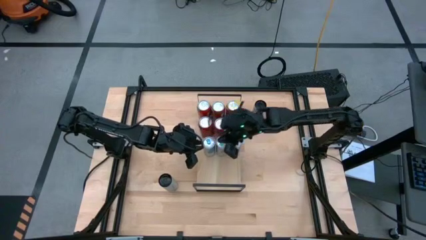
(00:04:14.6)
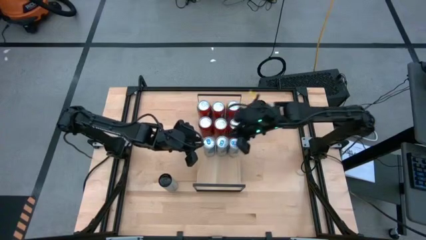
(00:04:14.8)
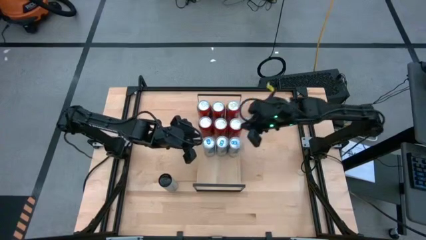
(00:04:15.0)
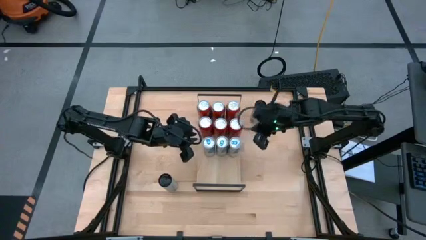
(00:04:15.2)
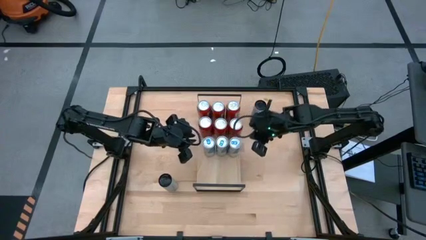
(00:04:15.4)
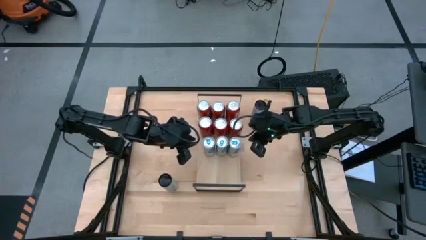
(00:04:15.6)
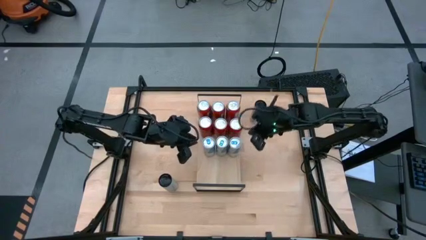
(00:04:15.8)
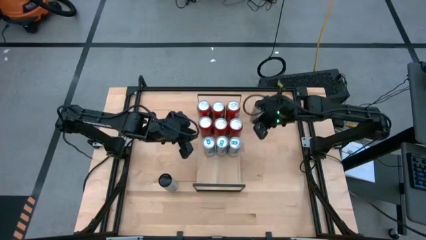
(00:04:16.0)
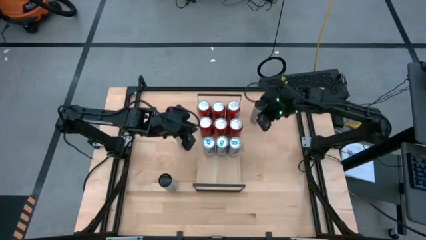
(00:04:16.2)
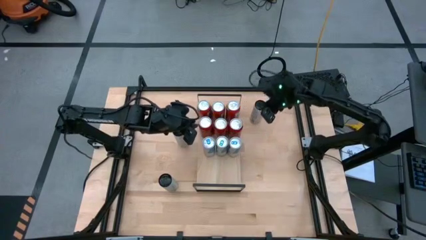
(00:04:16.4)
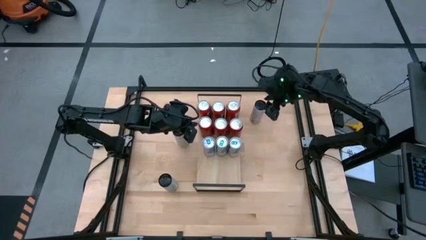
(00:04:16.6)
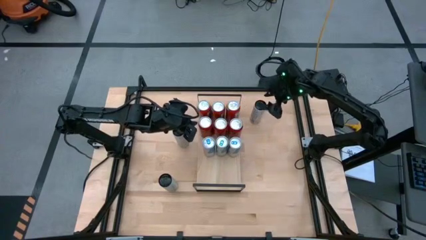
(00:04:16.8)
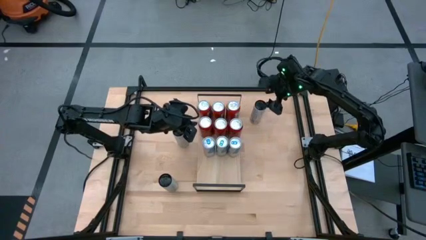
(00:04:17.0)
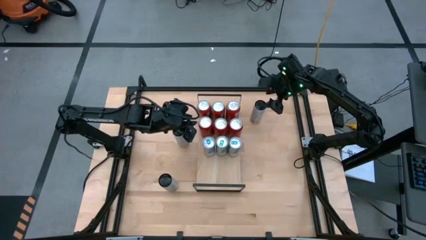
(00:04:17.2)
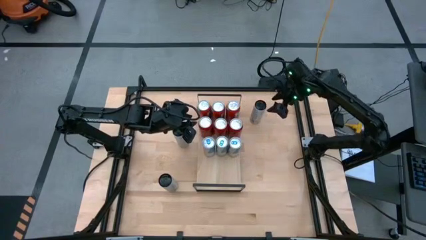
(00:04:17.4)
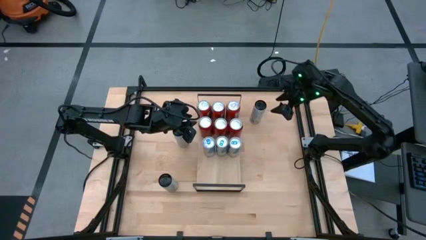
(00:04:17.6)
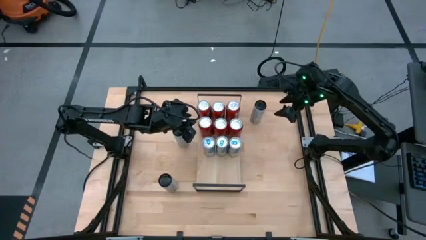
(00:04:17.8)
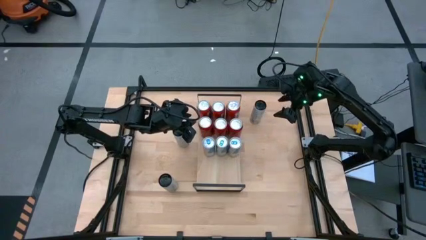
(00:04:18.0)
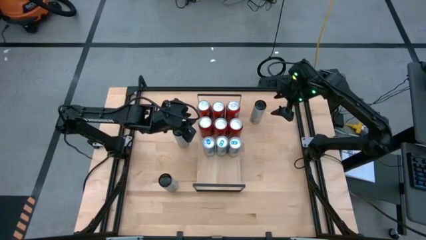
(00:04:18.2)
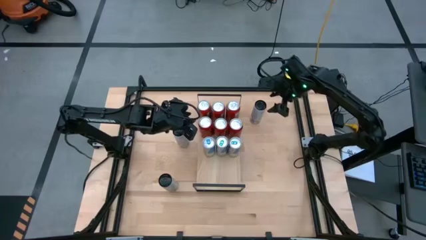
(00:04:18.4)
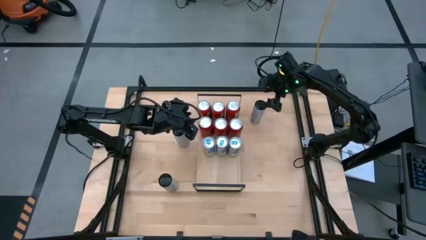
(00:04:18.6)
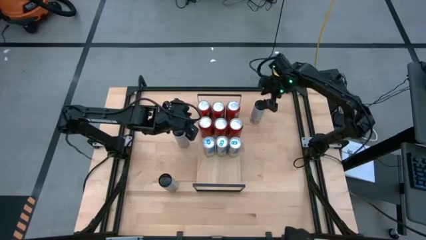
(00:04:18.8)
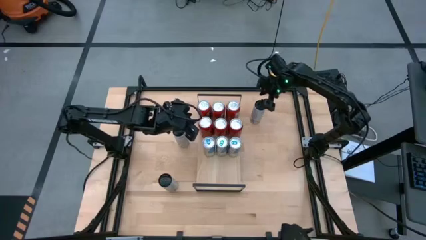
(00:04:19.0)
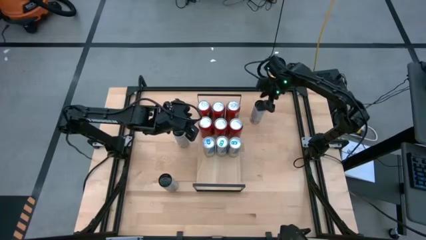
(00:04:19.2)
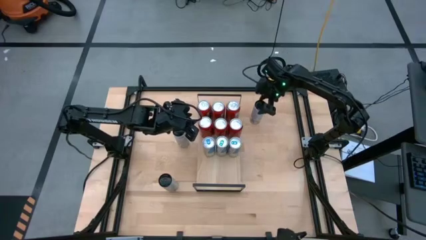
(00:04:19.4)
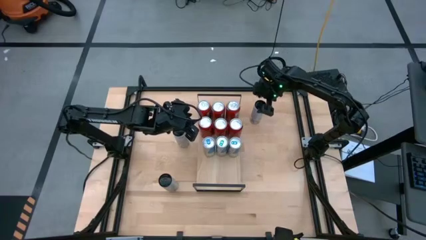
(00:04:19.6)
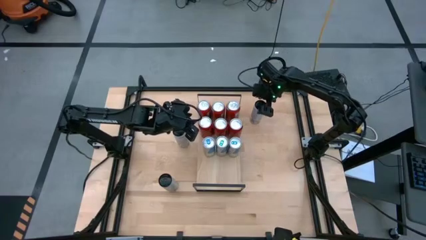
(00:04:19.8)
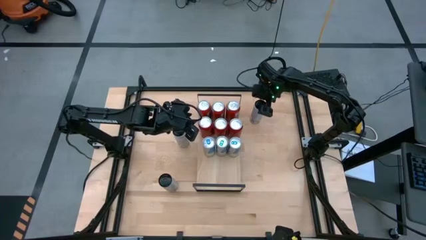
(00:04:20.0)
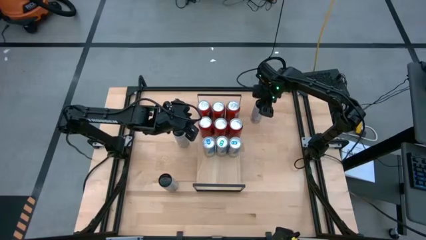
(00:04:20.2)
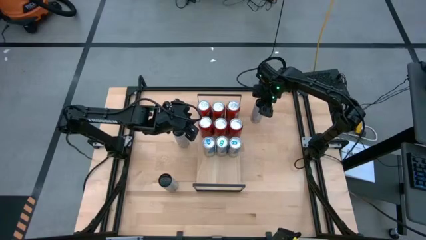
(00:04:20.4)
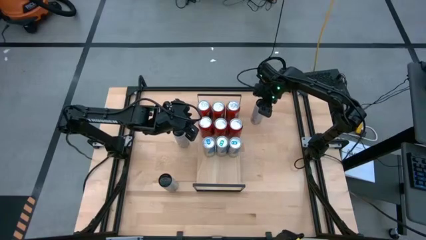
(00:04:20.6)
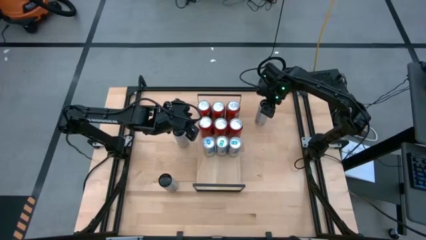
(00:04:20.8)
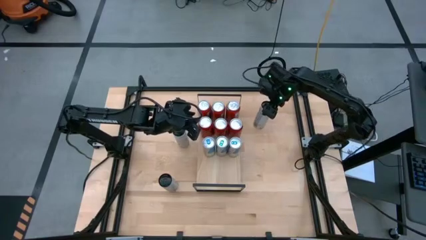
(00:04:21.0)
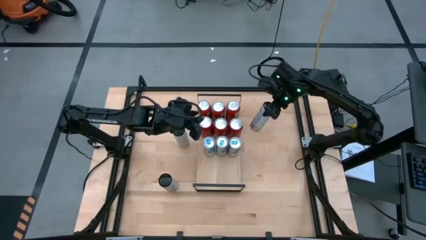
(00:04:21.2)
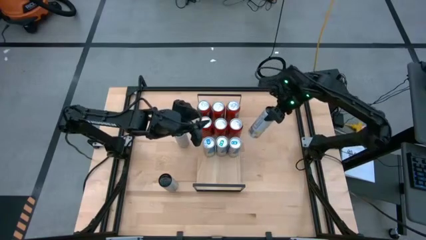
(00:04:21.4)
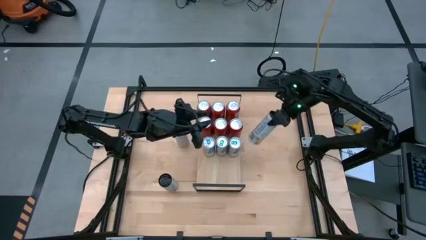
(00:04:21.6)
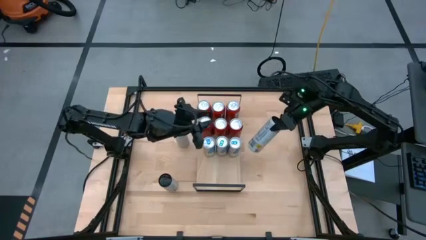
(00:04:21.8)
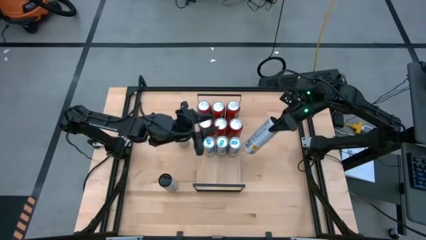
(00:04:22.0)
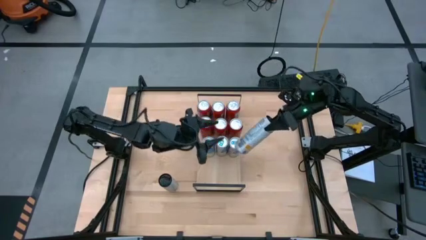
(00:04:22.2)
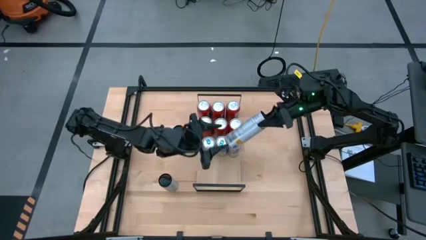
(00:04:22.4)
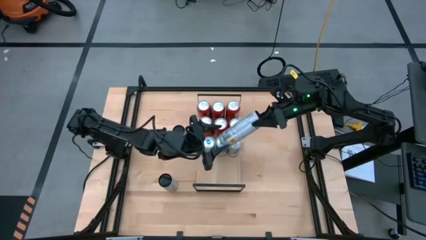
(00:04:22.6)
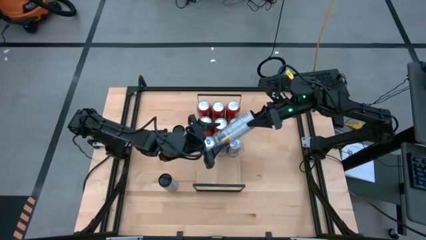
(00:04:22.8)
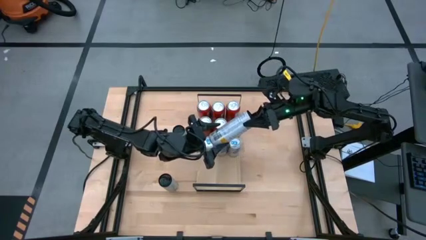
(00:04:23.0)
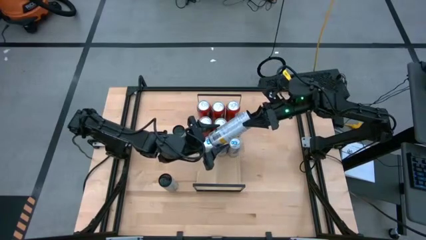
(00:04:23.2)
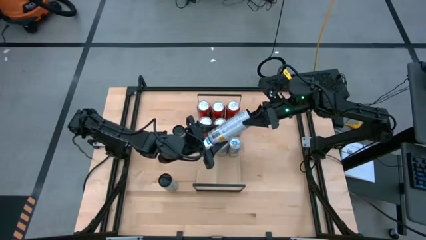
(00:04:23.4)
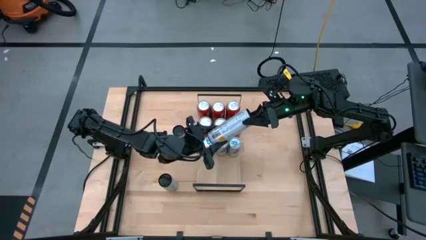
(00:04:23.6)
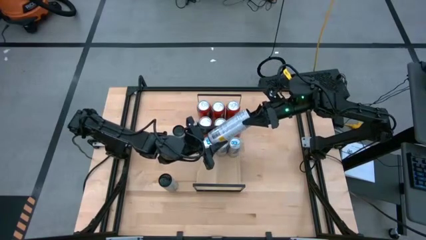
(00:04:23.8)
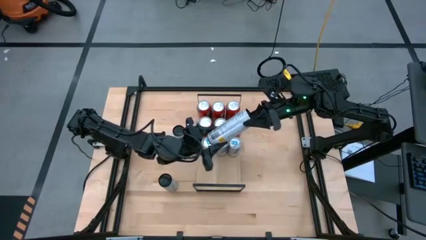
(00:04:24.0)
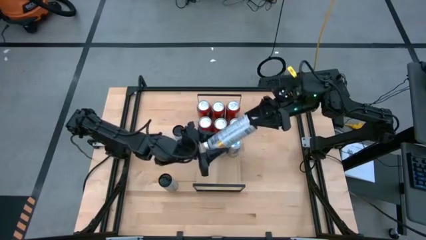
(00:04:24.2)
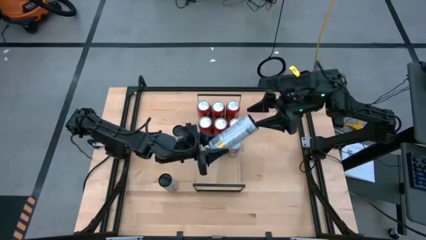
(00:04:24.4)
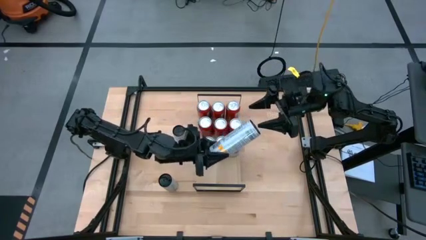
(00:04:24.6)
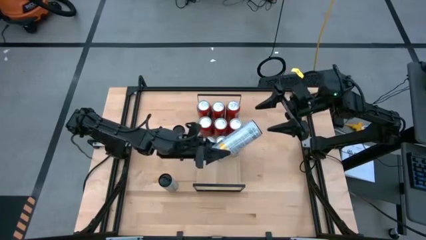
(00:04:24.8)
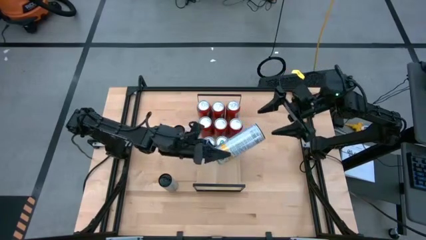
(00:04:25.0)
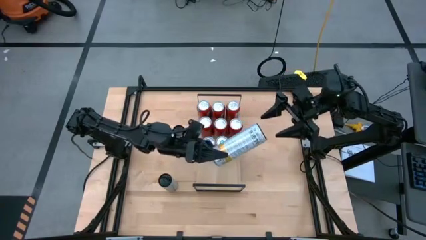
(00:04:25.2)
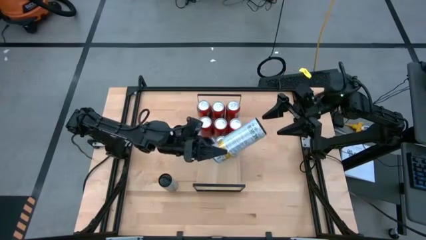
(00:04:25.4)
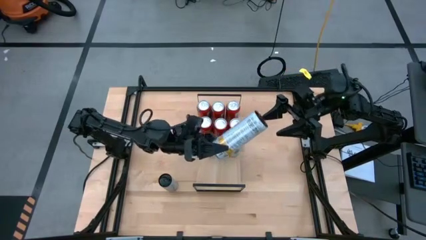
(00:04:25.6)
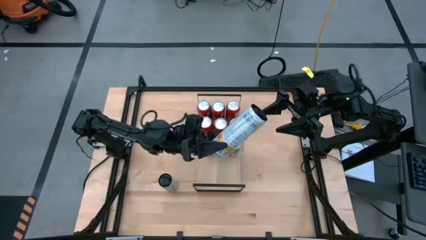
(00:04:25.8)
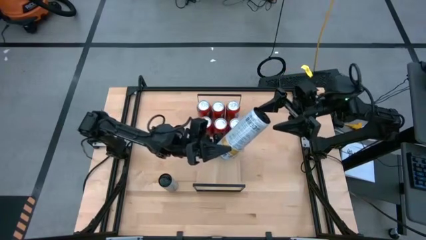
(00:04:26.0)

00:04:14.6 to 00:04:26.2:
Task: Place canned beverage on shelf
Put the top white yellow soda can on the shelf

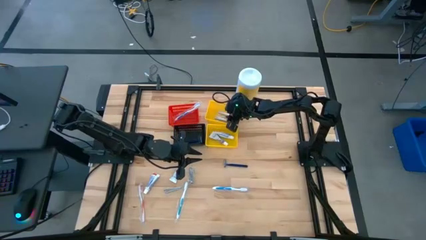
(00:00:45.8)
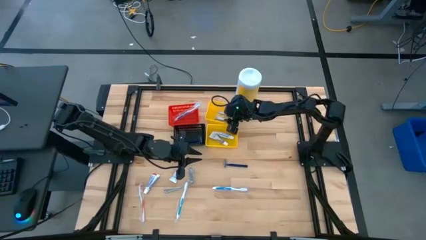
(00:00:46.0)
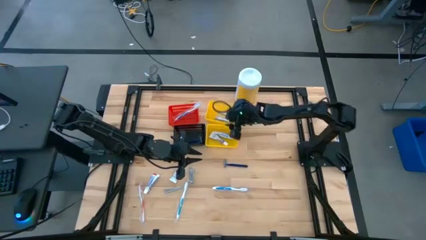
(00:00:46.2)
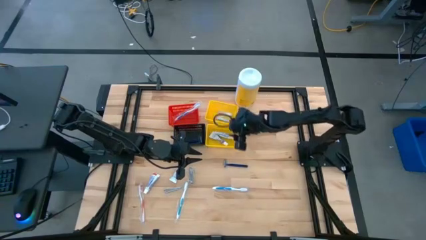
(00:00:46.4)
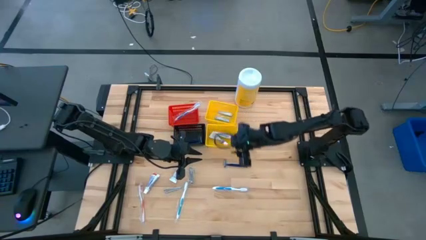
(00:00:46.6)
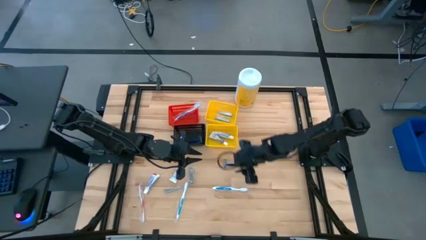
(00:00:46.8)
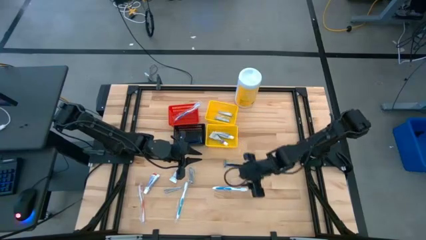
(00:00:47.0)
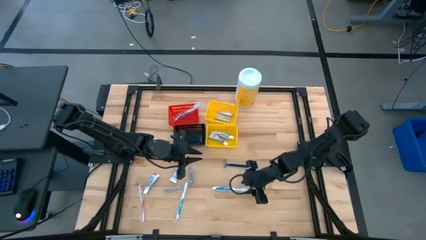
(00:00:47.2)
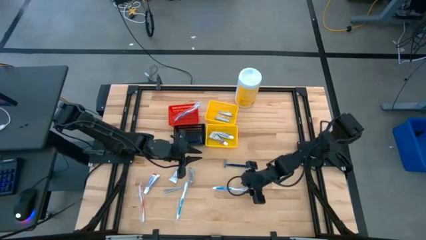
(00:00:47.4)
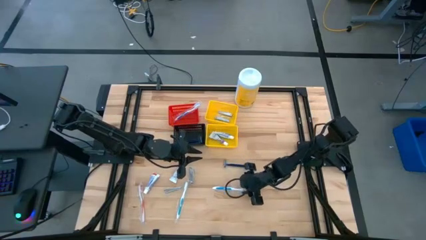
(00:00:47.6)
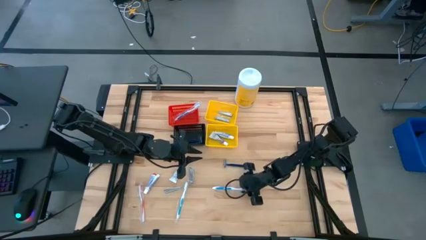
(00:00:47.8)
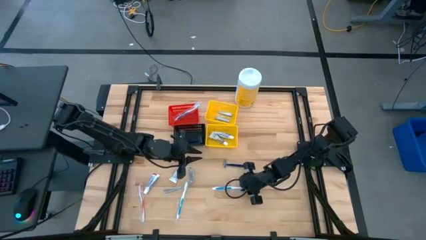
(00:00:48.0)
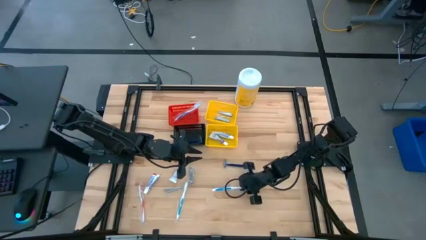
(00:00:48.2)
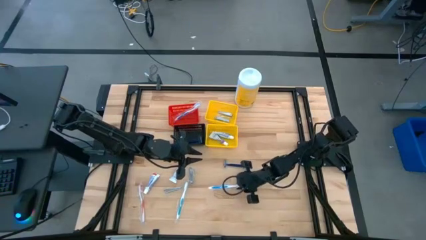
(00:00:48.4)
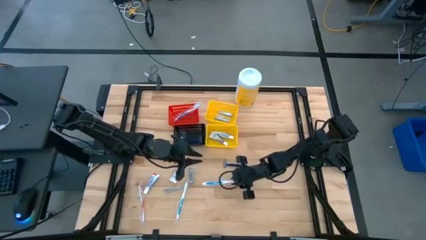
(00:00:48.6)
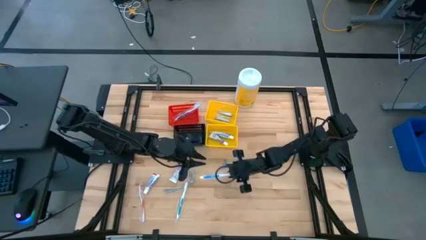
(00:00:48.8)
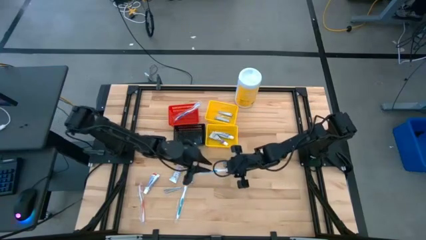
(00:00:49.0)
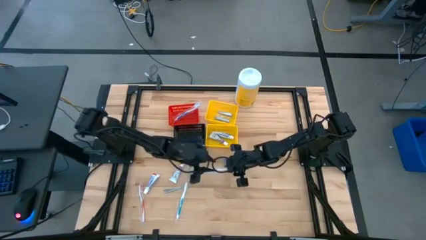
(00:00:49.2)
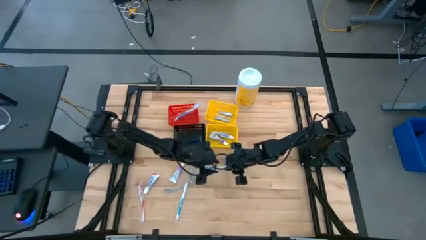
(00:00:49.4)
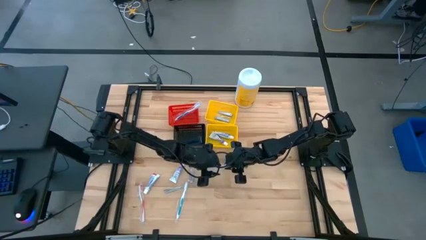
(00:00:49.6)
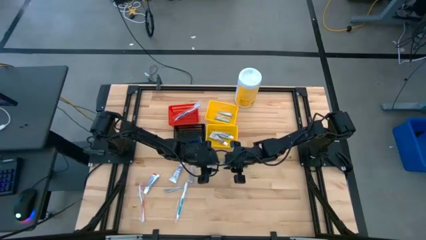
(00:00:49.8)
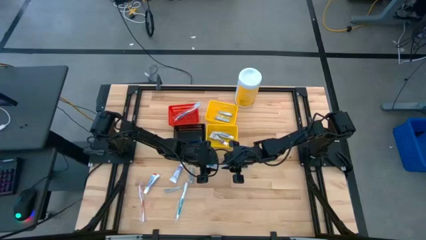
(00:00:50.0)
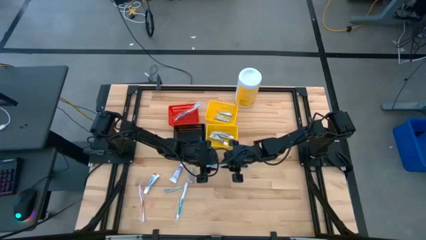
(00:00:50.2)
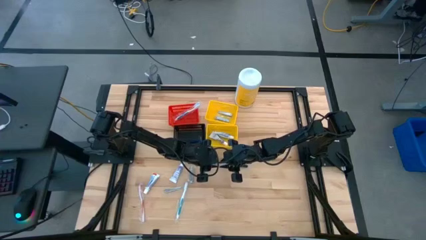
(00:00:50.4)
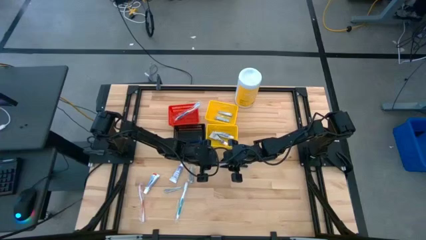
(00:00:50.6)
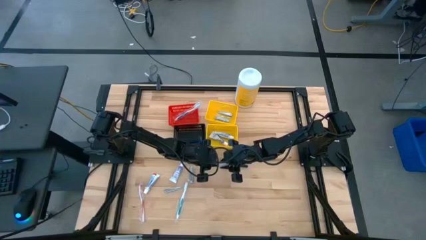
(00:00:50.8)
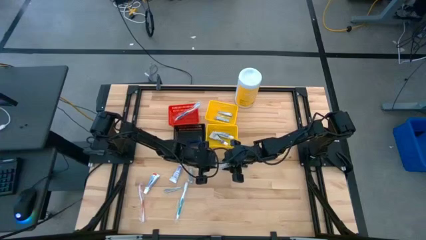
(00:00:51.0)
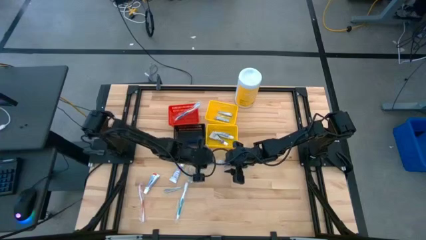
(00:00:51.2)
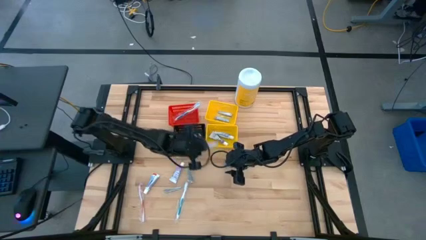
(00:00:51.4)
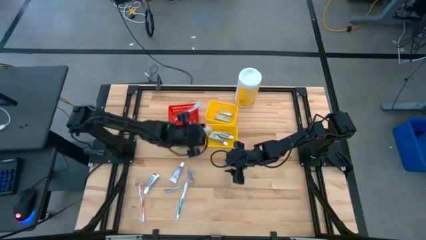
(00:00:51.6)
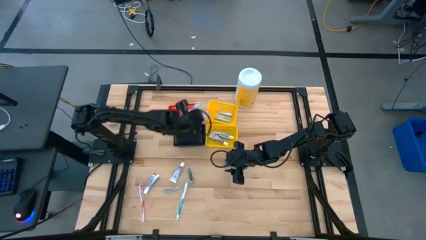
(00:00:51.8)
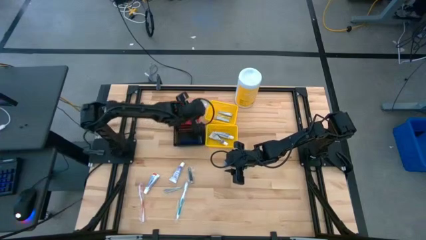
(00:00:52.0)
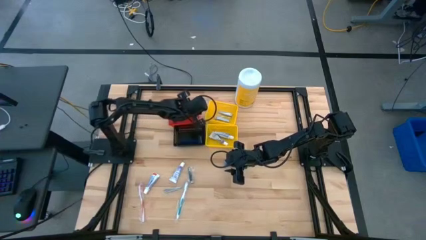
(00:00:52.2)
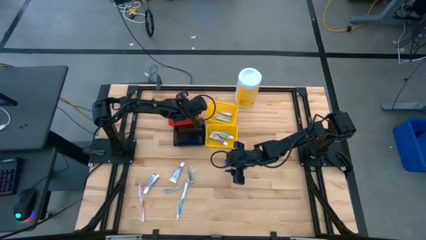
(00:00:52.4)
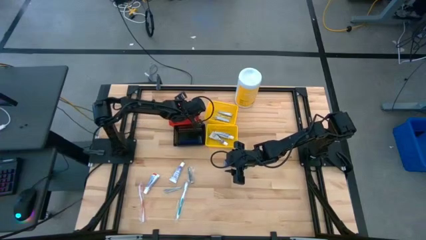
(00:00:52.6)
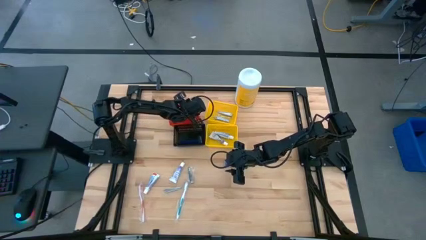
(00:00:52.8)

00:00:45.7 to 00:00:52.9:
Task: Pick & Place Travel size toiletries
Put the blue toothbrush into the red bin
